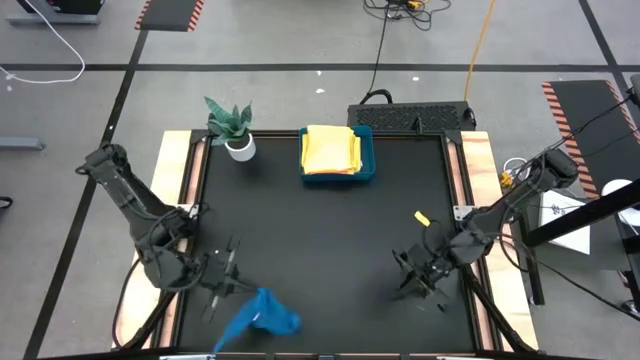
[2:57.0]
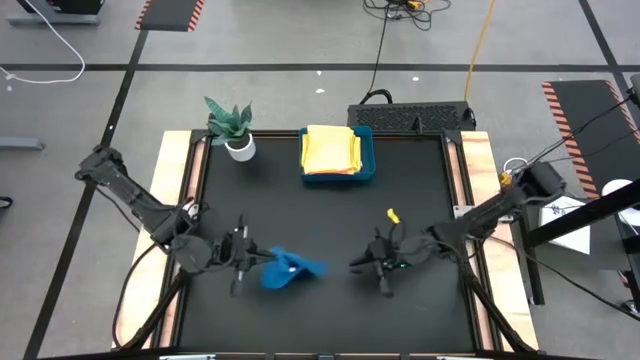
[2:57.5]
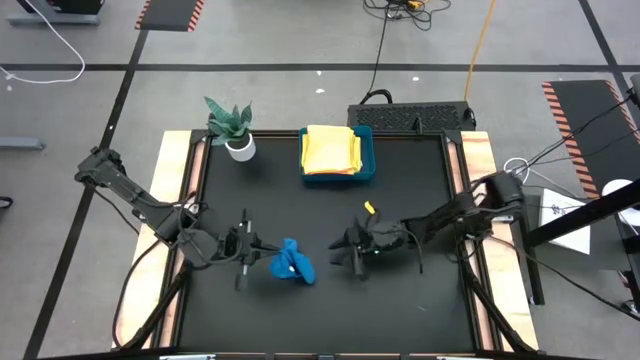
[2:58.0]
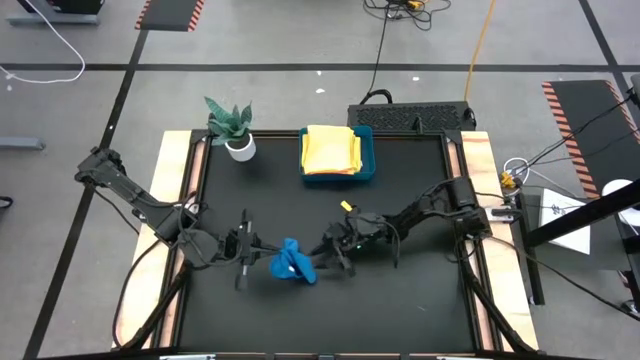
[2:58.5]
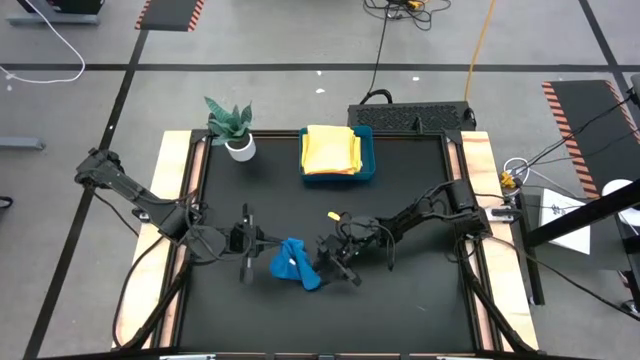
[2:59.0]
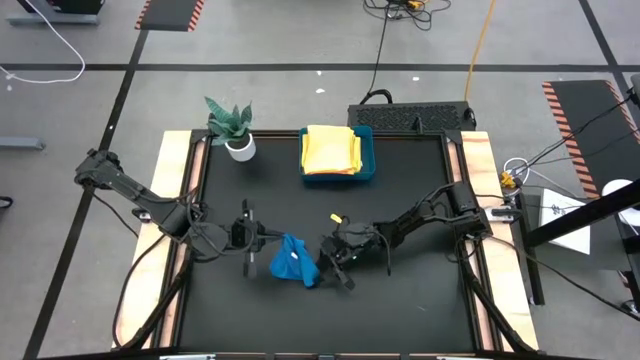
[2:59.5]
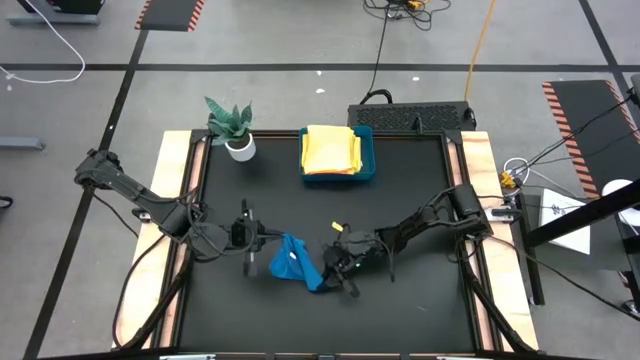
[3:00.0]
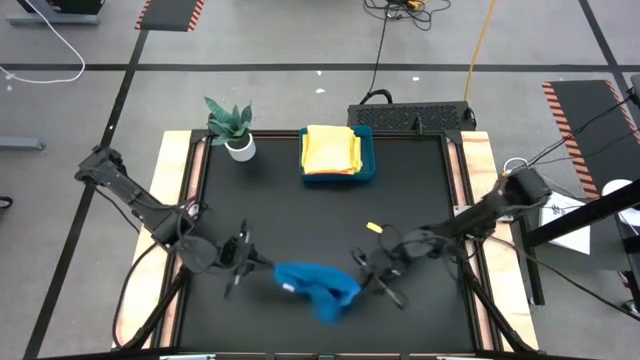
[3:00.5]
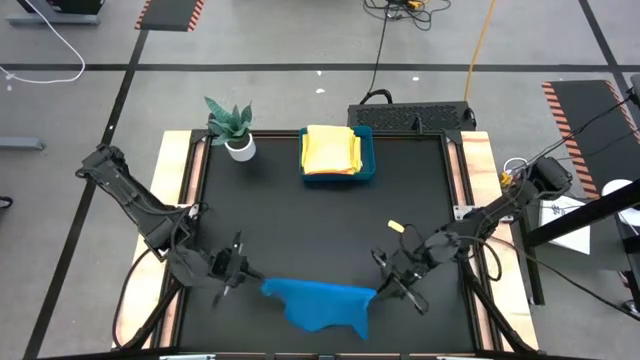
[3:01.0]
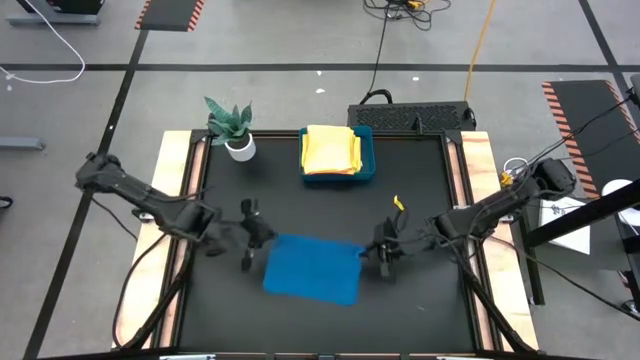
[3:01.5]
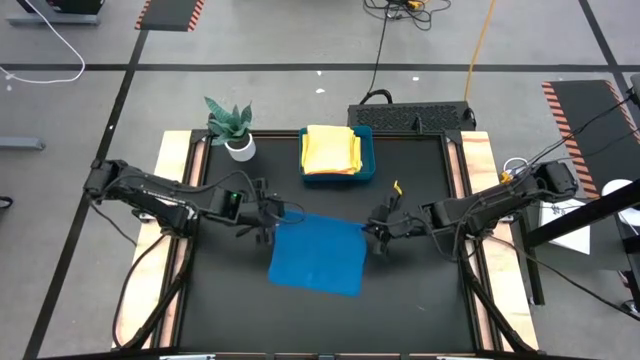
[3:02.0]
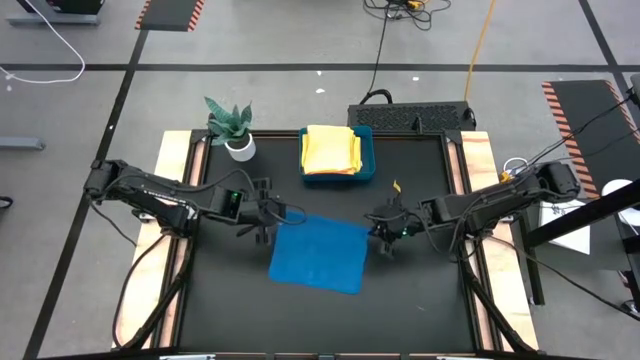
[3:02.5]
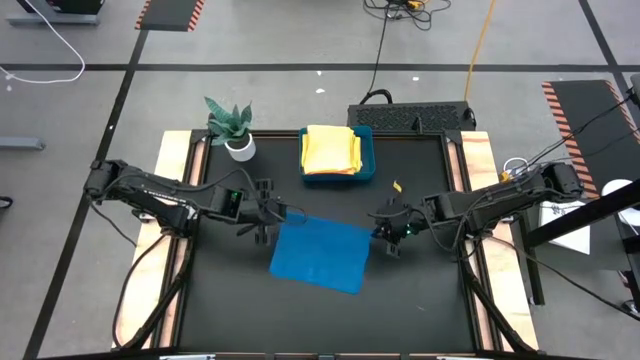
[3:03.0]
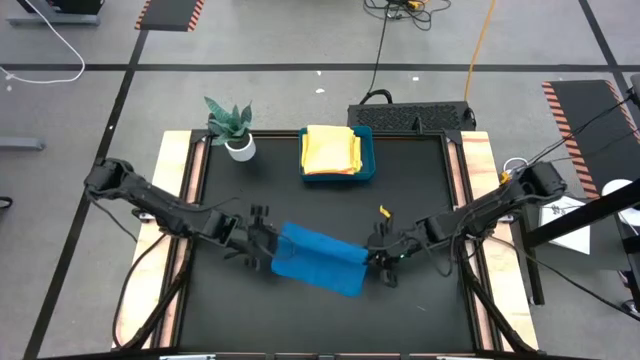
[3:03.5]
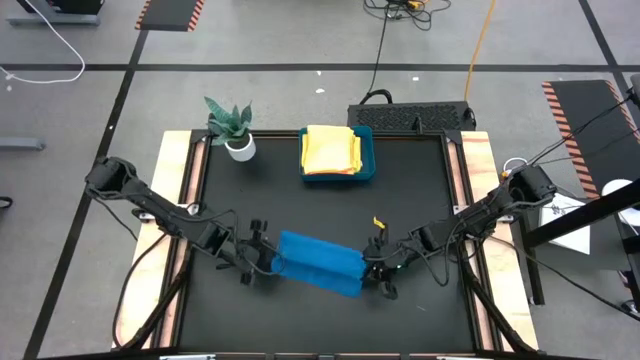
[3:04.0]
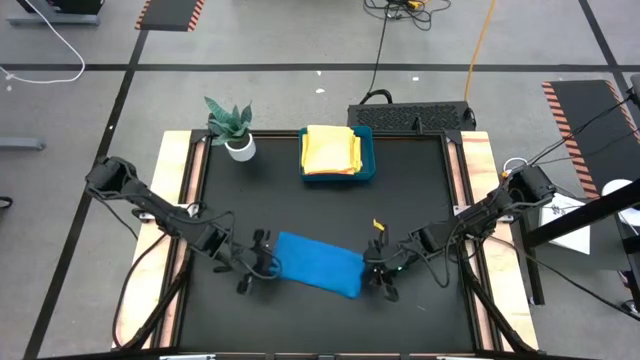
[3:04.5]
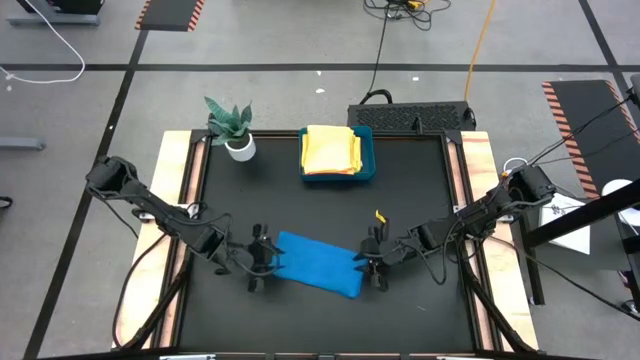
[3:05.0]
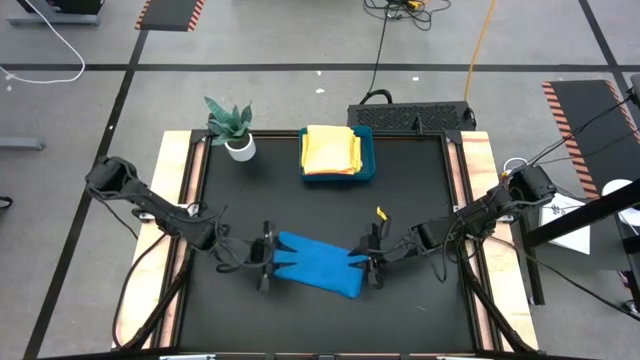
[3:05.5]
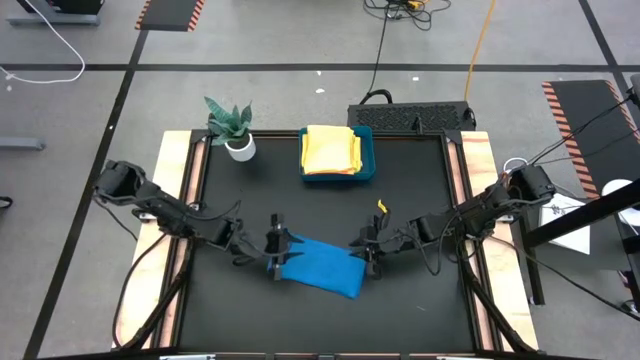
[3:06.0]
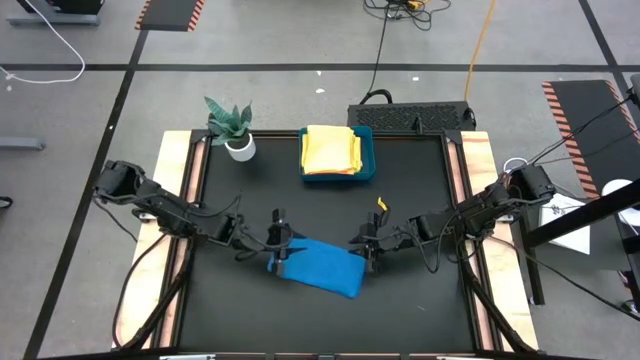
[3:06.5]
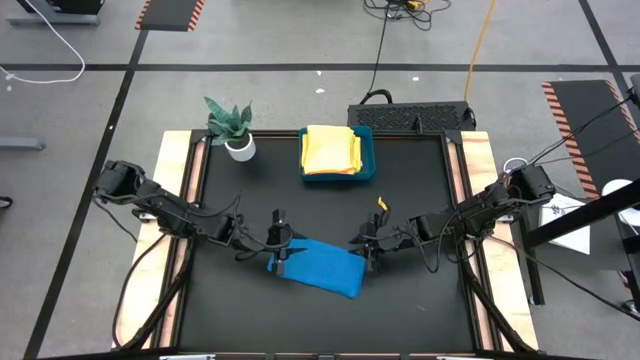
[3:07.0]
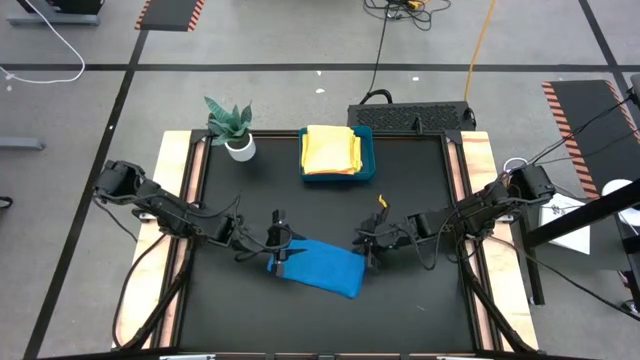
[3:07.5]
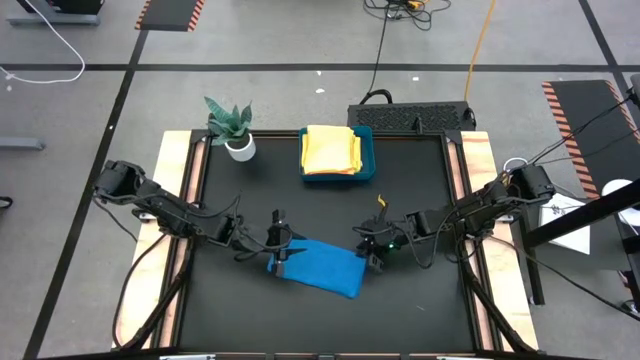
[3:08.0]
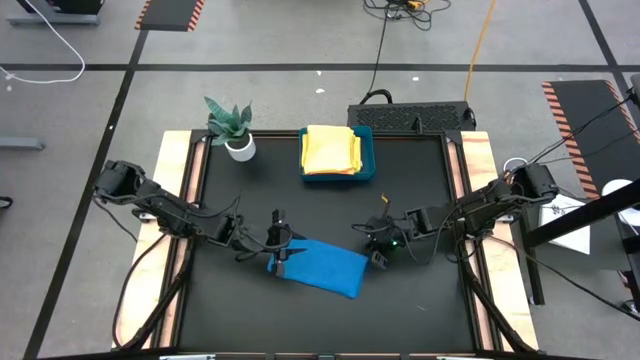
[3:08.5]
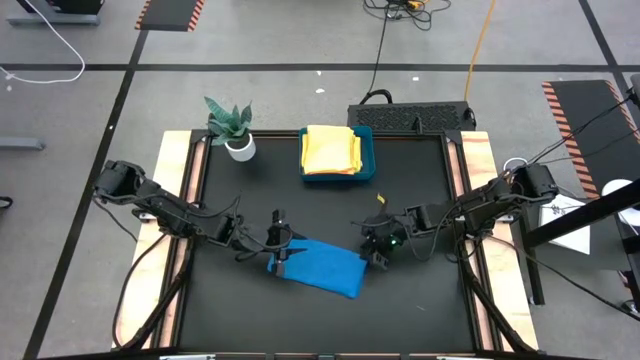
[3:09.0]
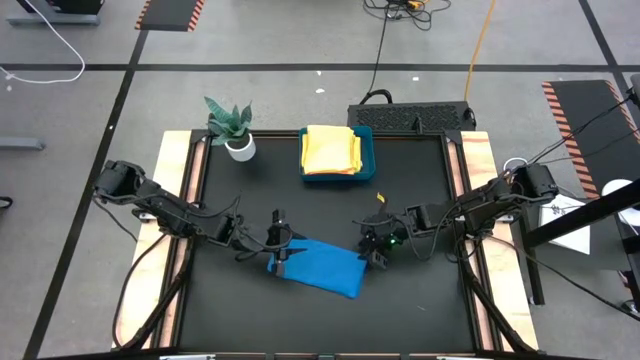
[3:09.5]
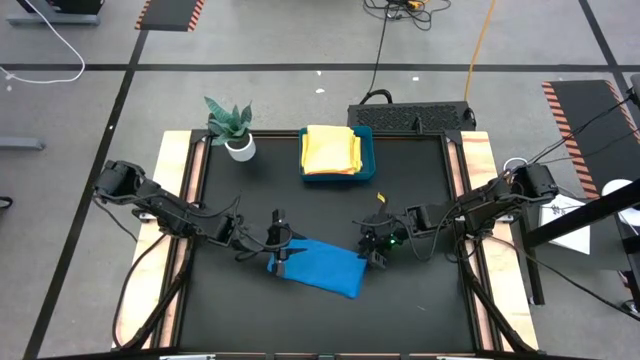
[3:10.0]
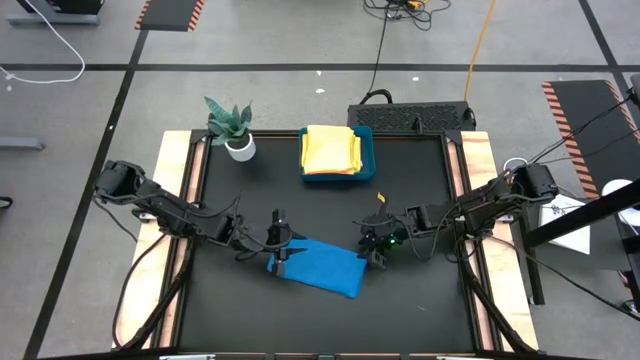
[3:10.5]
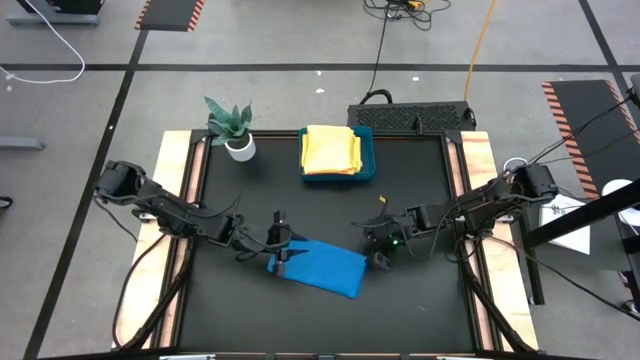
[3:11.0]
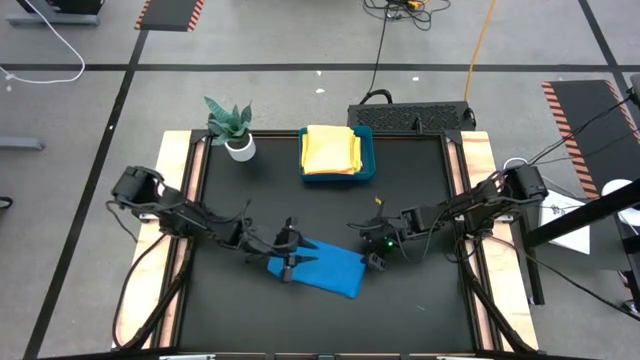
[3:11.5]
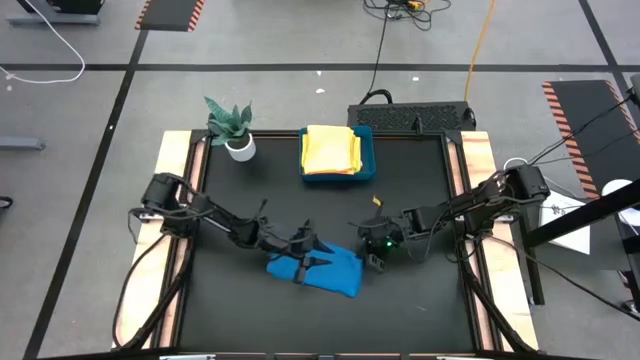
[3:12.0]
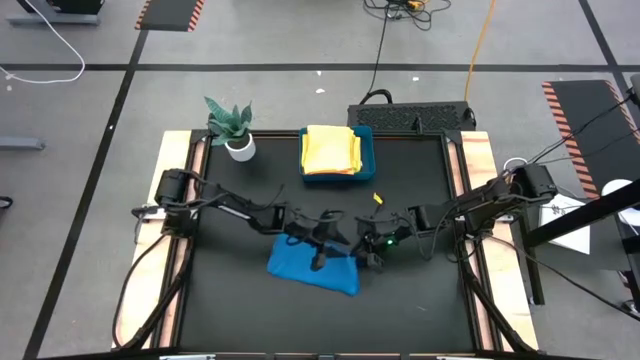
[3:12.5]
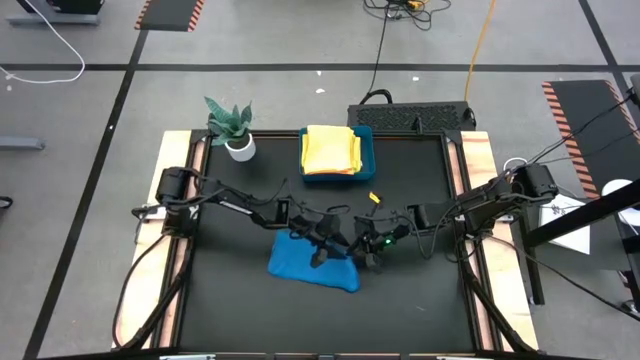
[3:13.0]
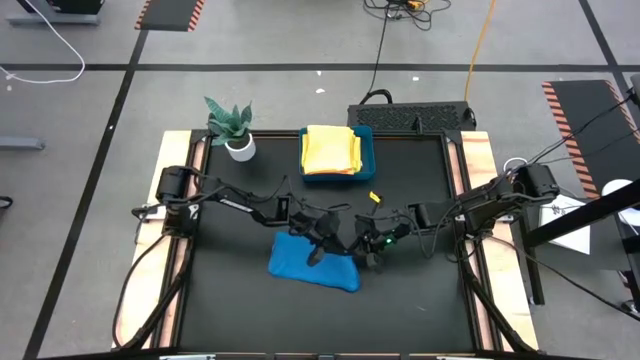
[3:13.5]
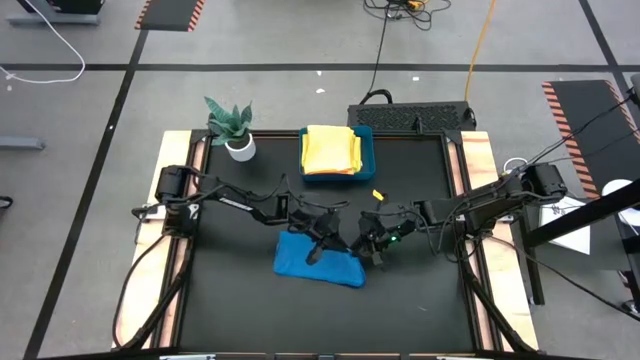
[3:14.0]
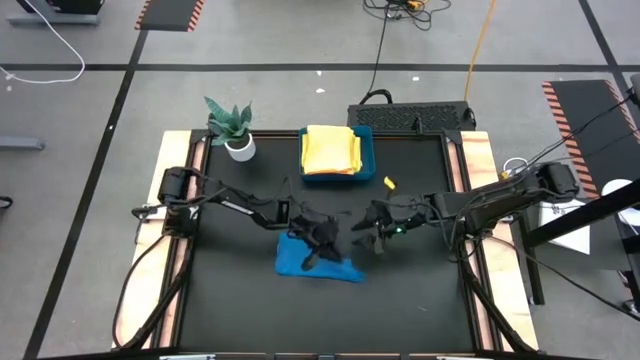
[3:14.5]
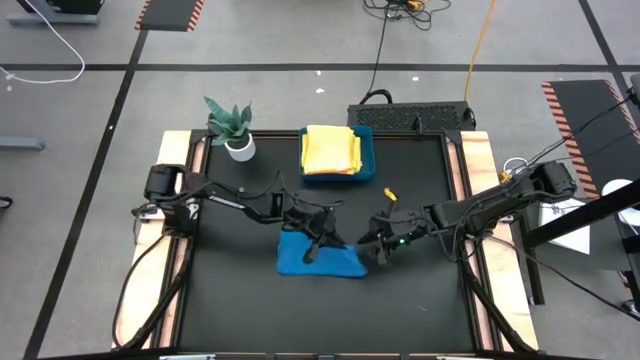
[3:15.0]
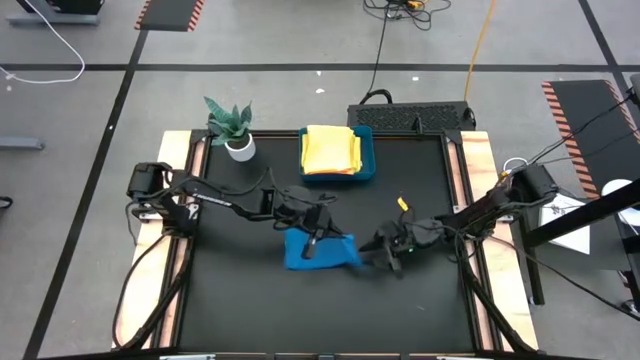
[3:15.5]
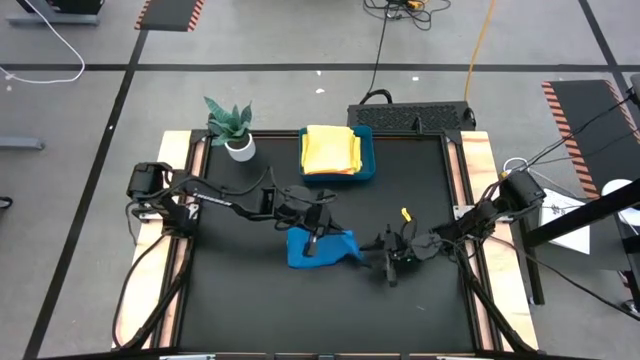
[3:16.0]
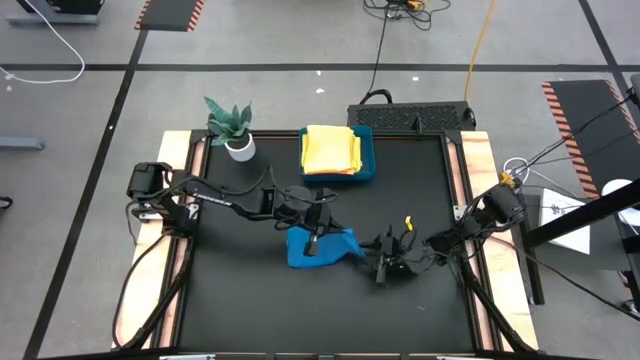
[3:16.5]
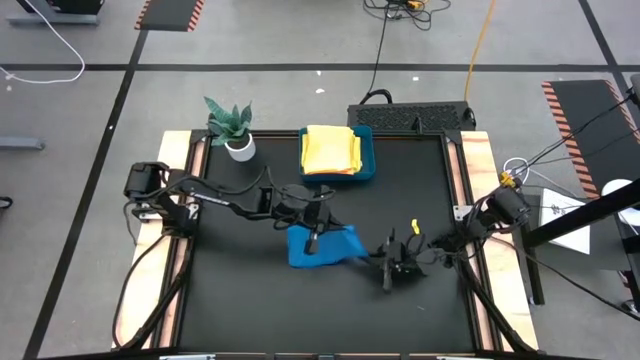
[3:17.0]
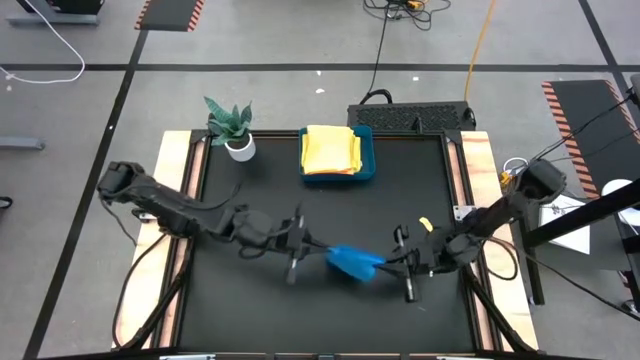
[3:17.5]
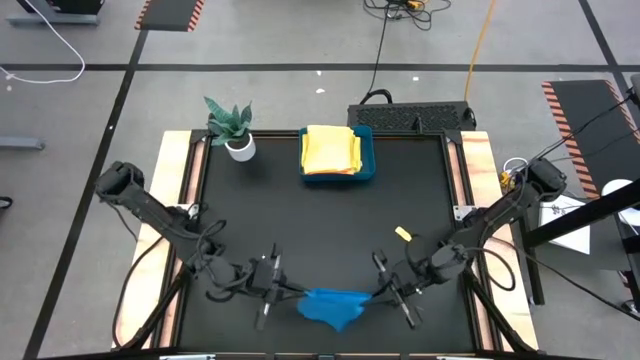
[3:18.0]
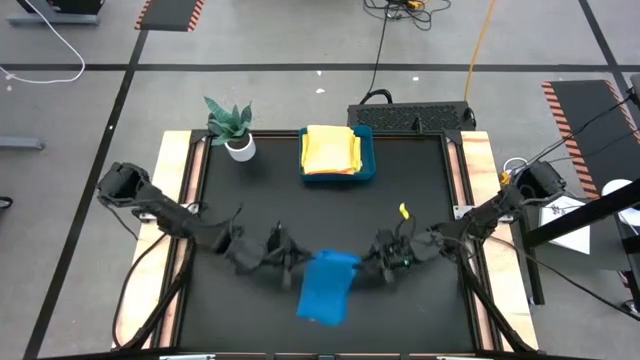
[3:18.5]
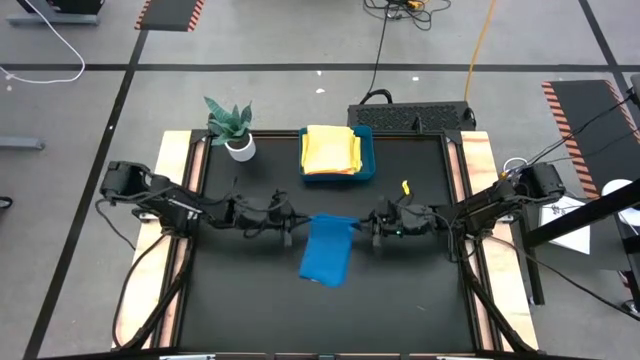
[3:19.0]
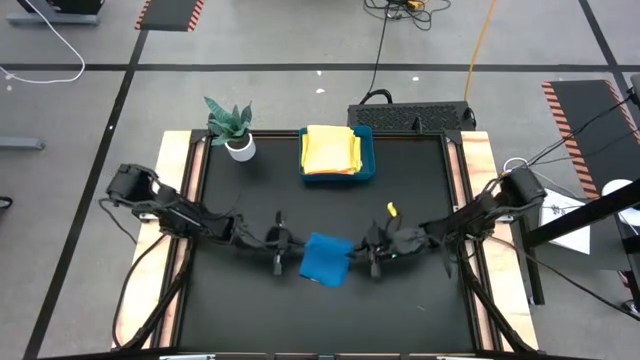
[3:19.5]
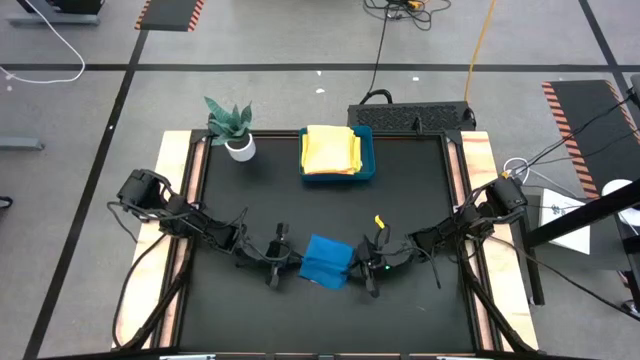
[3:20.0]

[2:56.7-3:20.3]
Task: Fold microfiber towels
Fold the blue microfiber cloth
